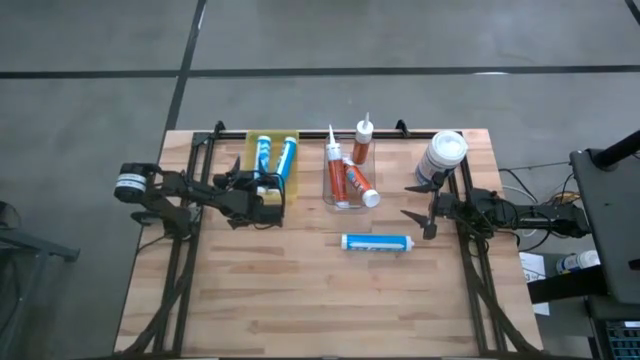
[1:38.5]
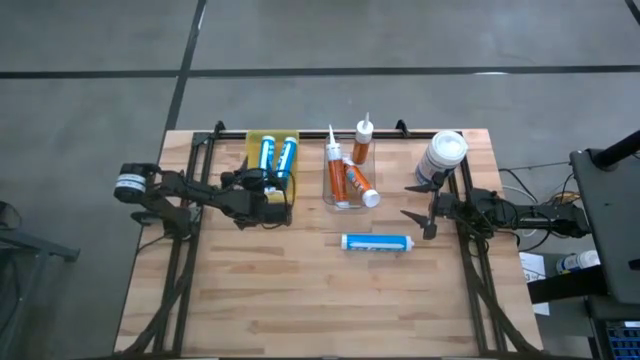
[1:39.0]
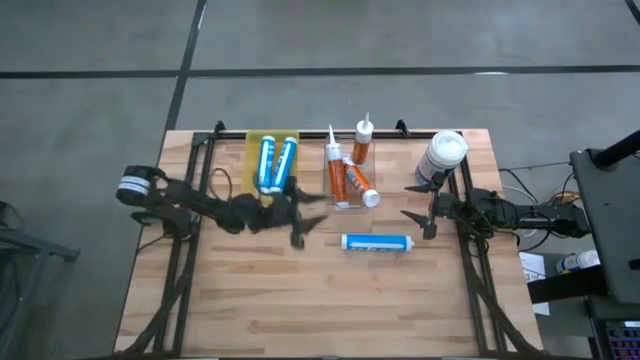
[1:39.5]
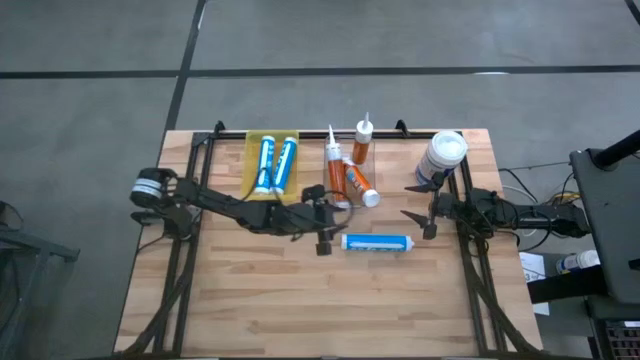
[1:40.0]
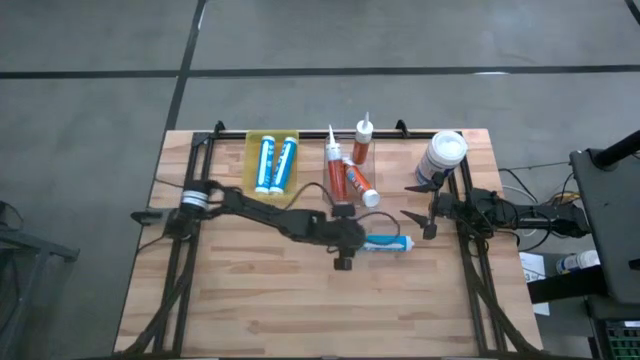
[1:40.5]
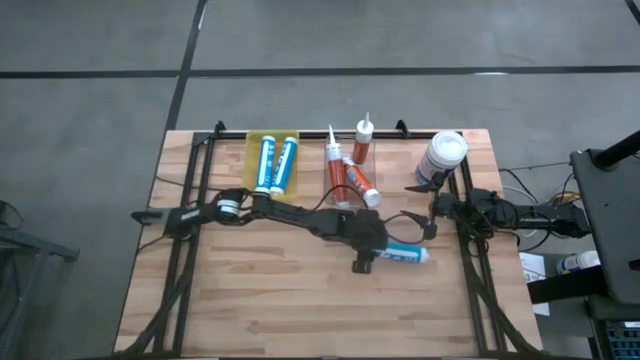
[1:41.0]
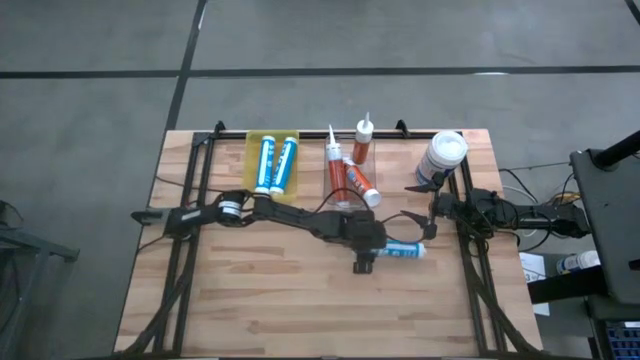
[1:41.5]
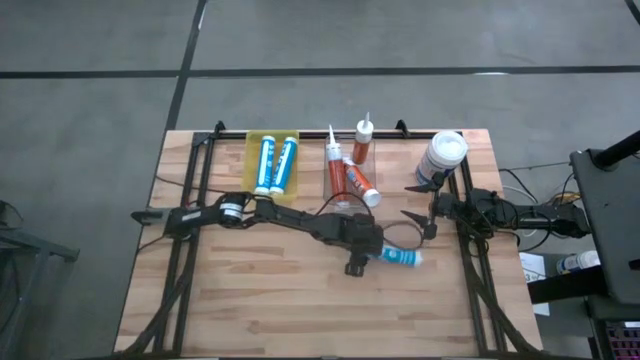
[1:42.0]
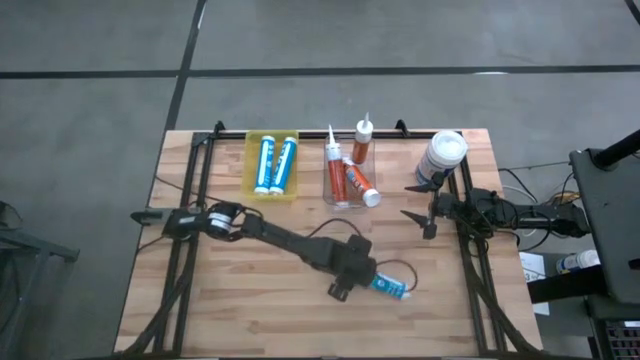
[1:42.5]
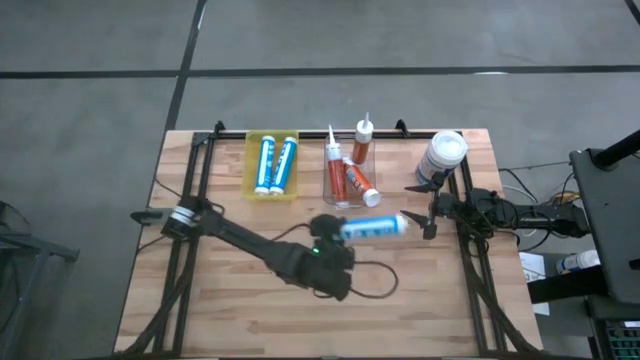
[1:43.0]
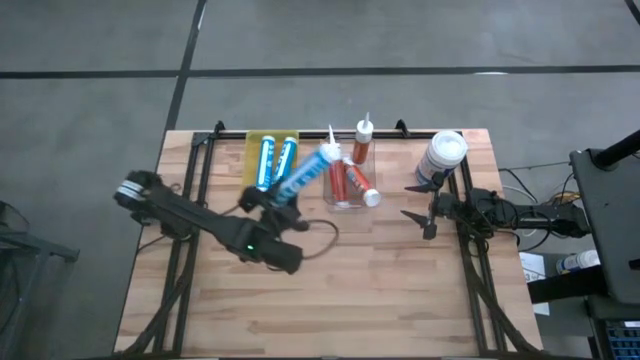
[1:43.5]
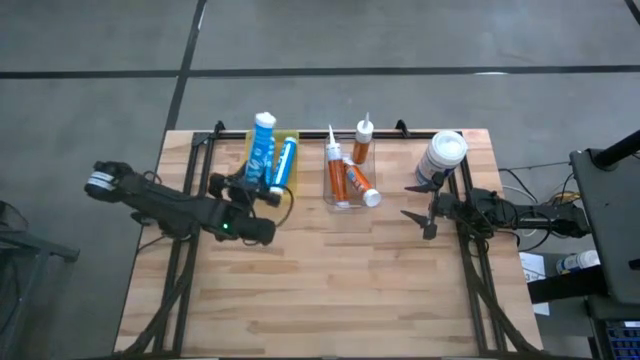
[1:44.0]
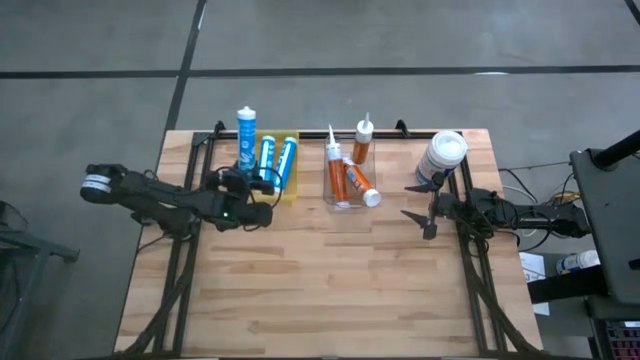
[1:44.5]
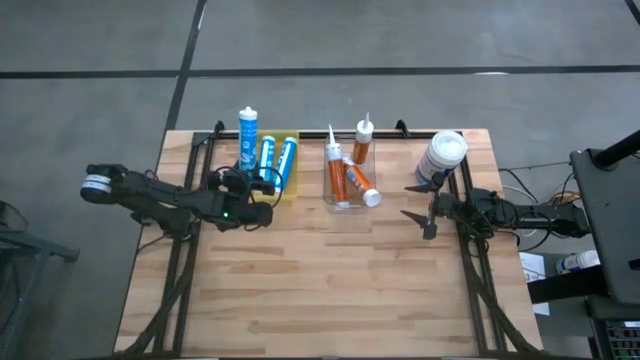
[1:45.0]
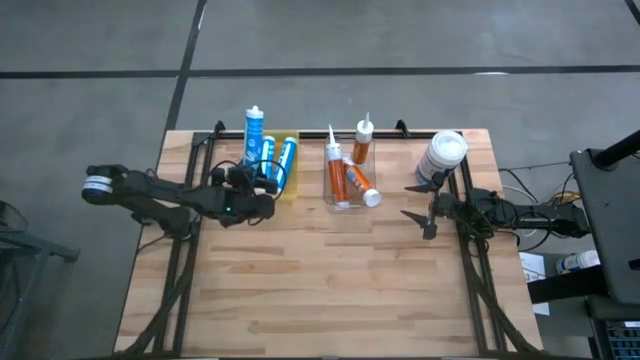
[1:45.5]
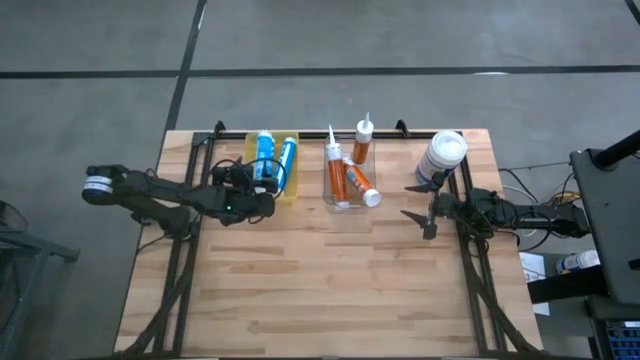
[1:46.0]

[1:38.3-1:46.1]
Task: Pick & place silicon tubes, Sealant and Lysol wipes
Put the blue sealant into the yellow bin

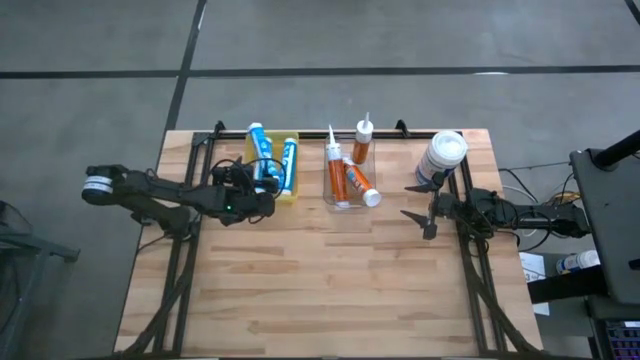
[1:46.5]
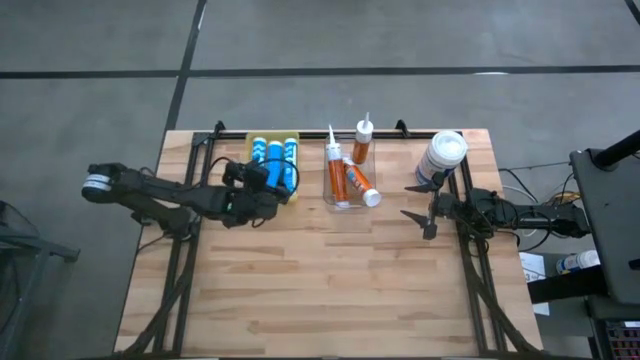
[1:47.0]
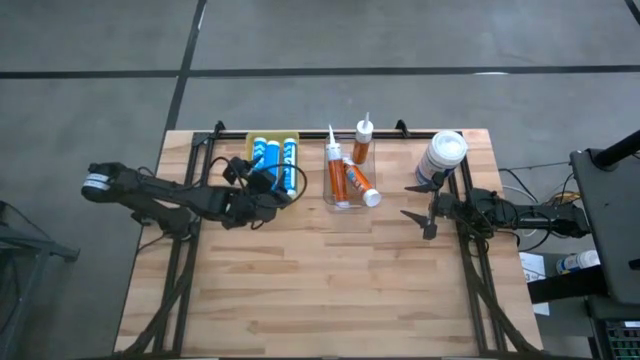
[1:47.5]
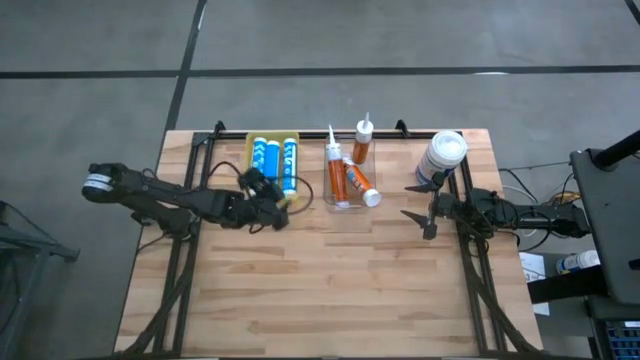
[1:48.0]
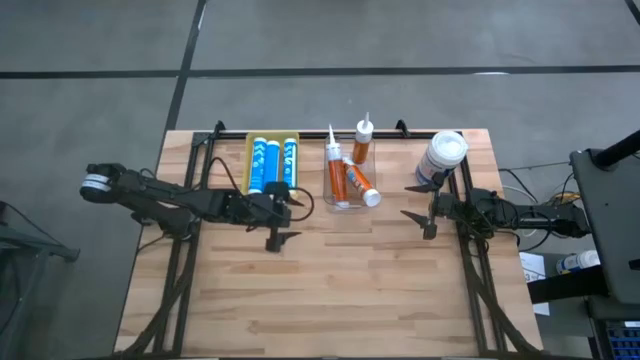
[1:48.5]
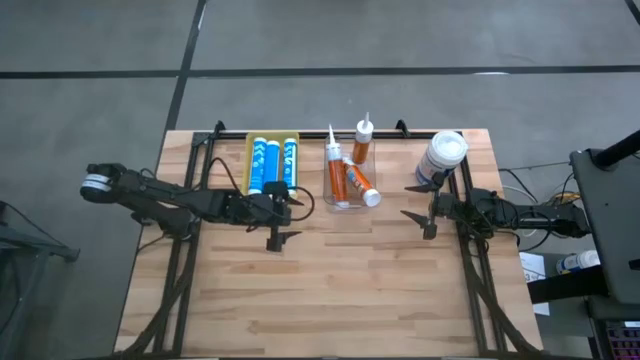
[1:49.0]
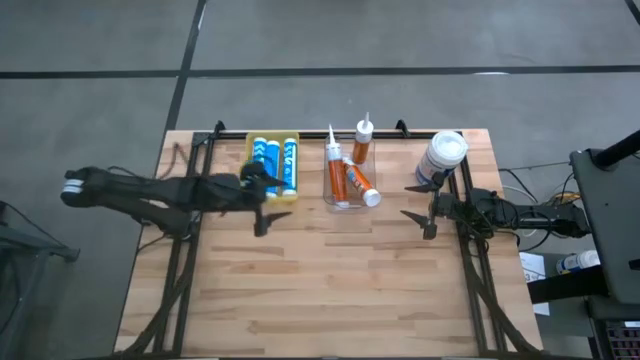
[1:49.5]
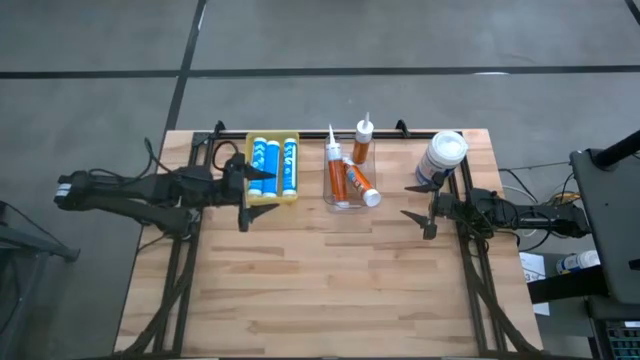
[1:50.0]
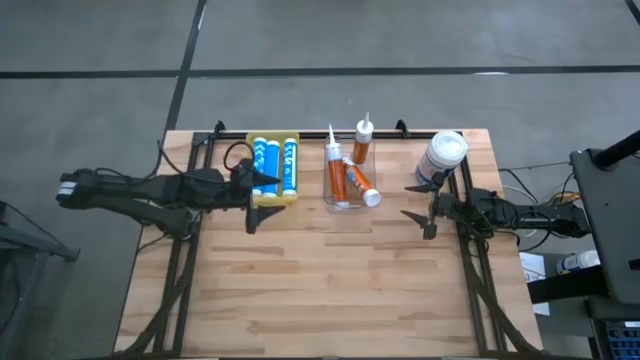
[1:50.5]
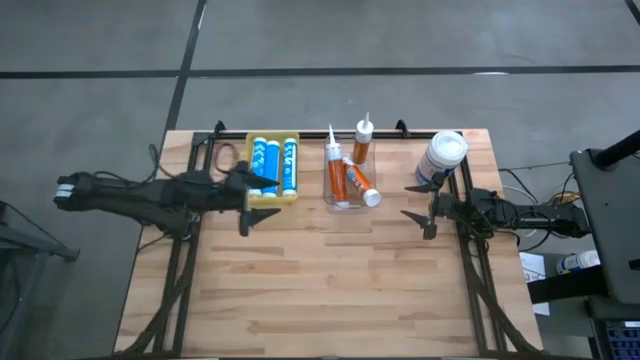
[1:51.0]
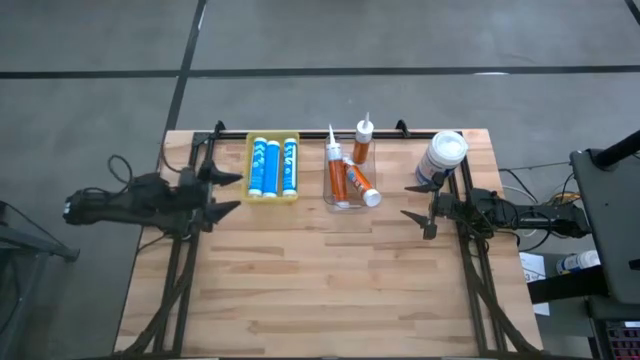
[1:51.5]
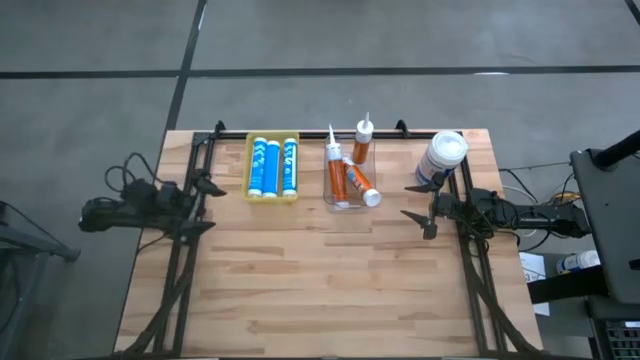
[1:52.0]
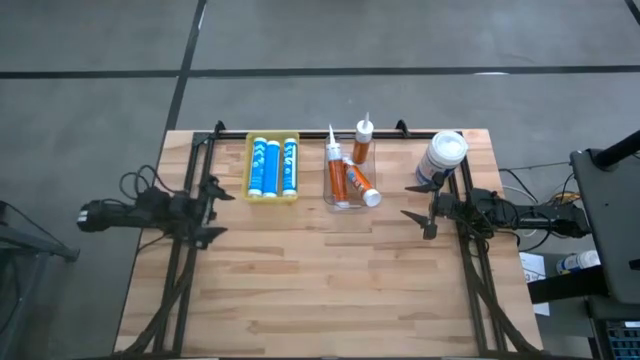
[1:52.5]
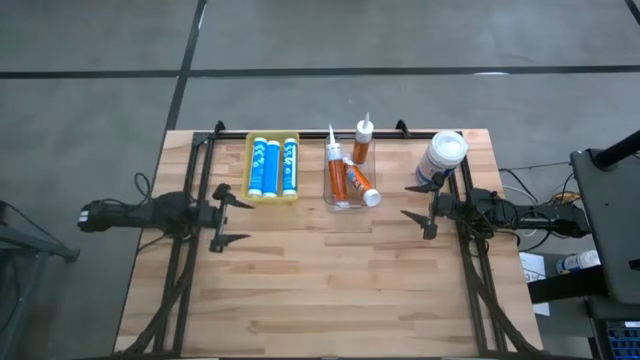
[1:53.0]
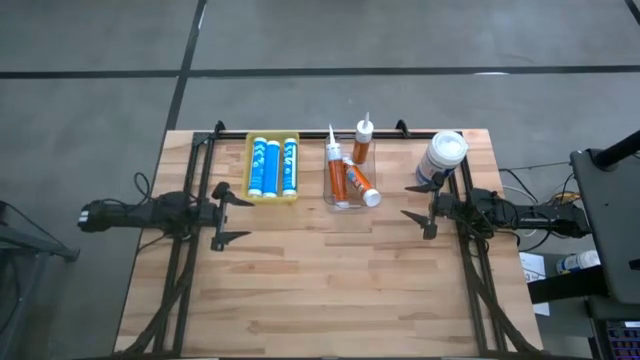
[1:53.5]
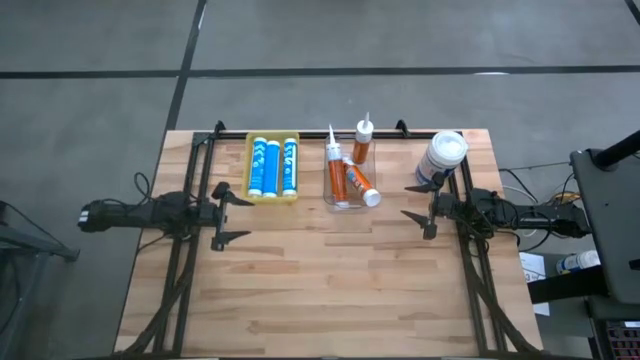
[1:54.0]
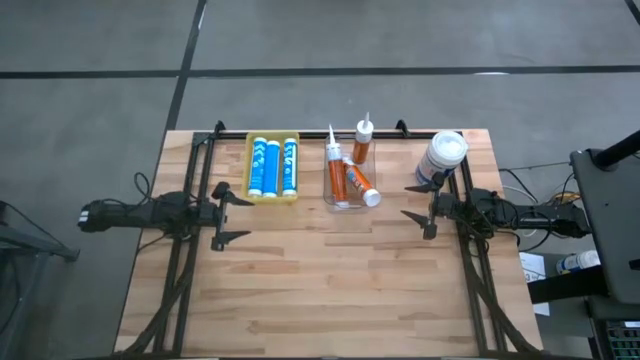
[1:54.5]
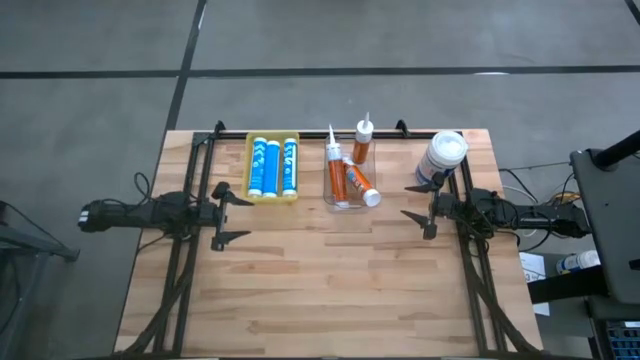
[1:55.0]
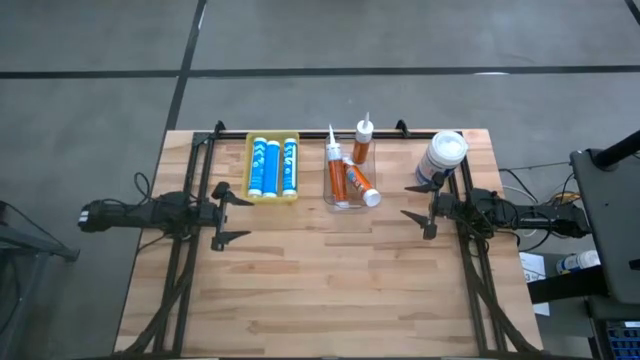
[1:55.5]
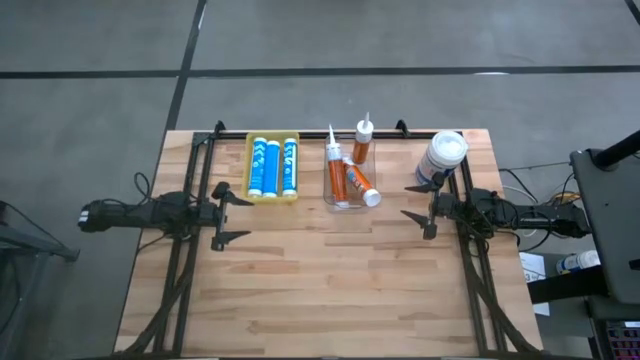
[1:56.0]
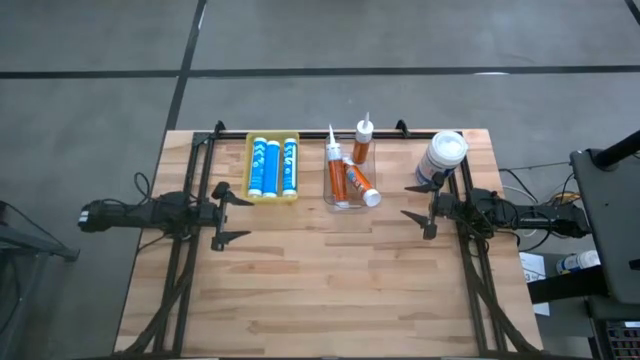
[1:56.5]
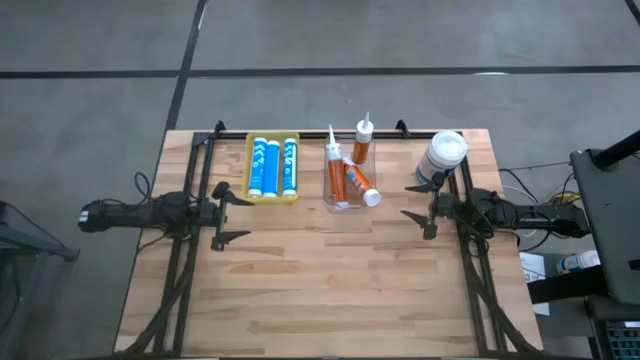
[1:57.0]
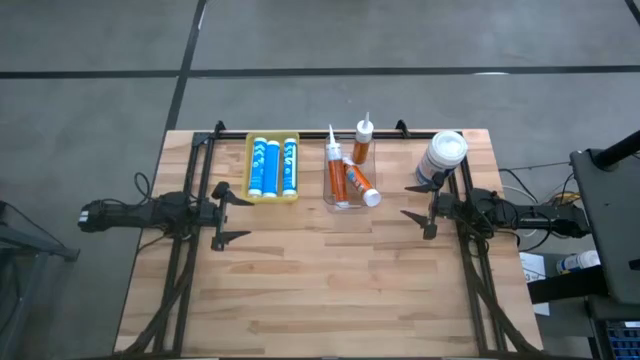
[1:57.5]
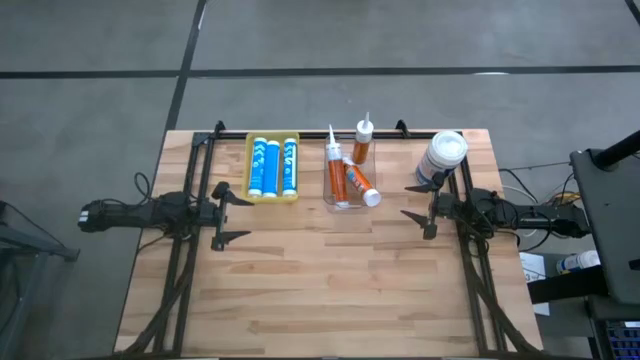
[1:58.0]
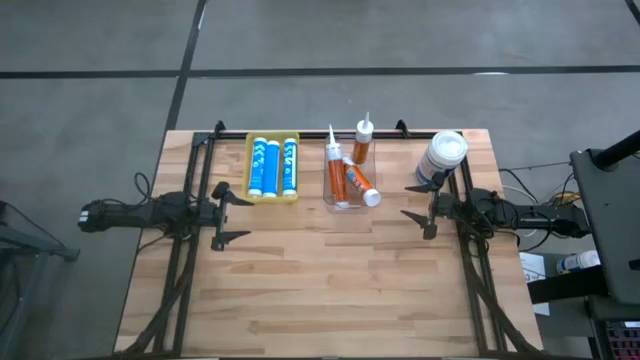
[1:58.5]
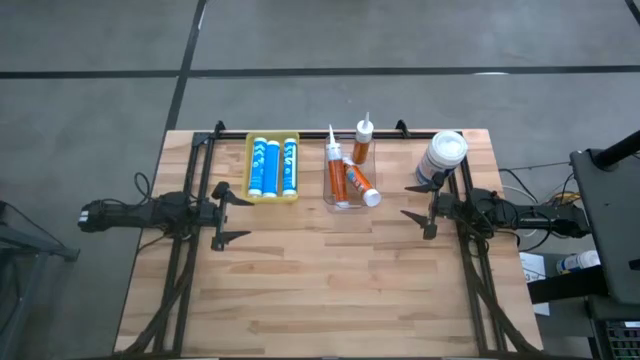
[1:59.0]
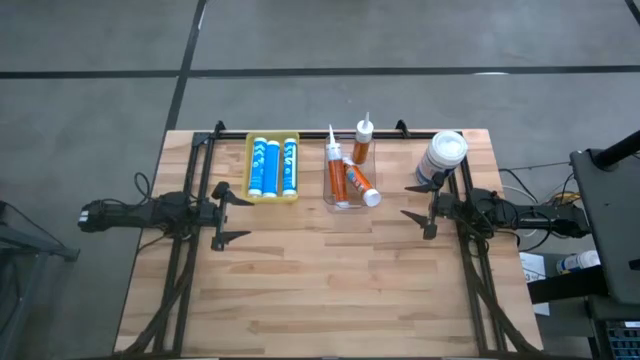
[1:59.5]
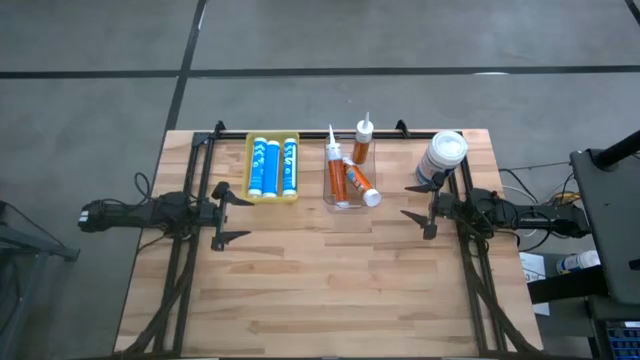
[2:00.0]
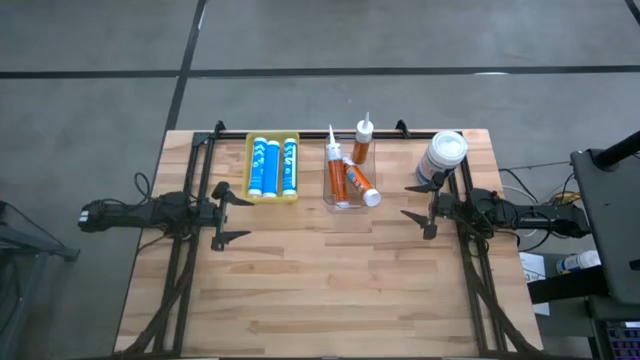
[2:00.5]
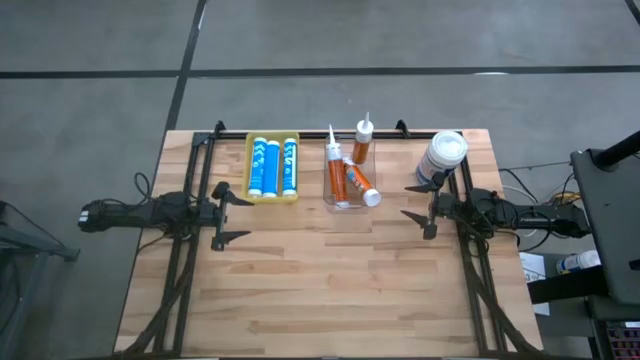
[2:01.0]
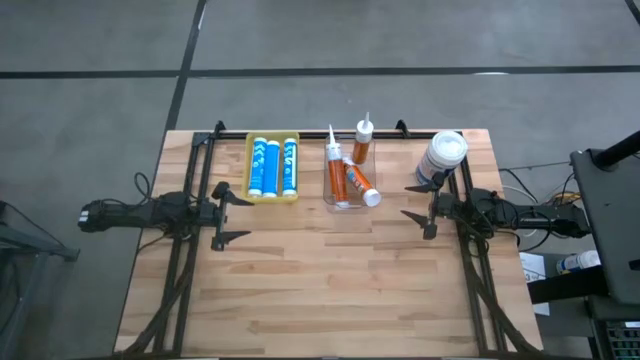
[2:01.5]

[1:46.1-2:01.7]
Return to Home Position
